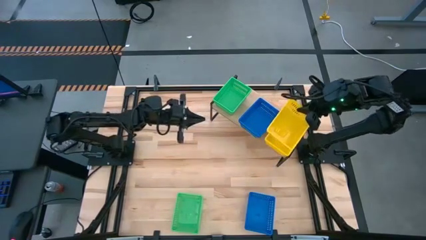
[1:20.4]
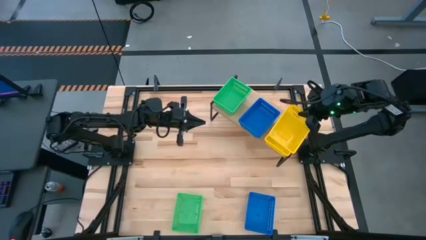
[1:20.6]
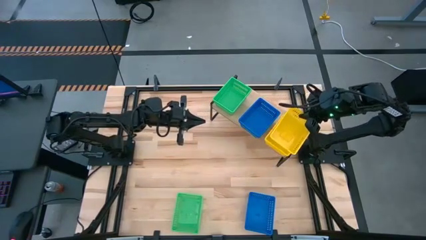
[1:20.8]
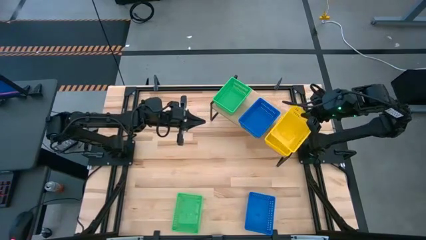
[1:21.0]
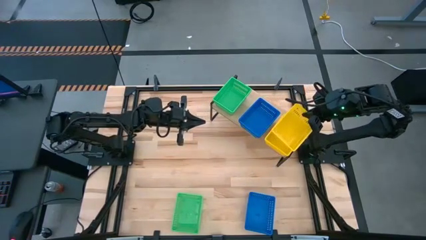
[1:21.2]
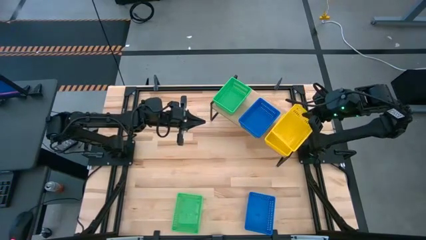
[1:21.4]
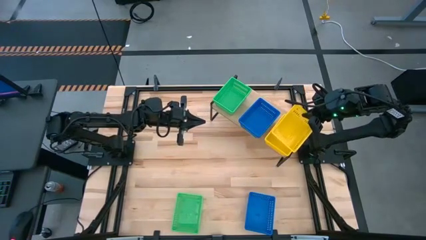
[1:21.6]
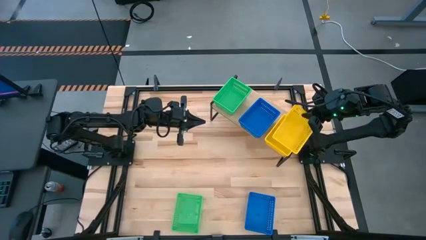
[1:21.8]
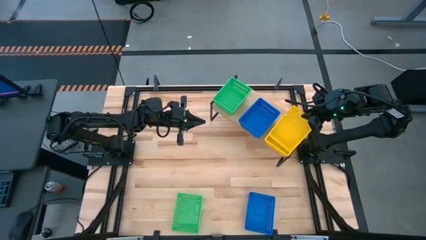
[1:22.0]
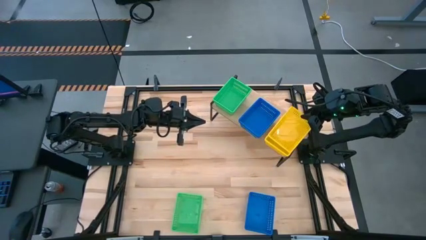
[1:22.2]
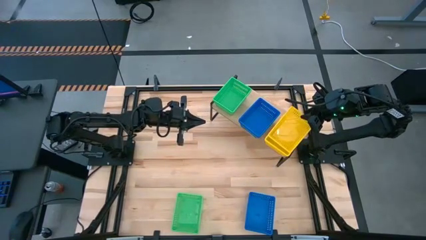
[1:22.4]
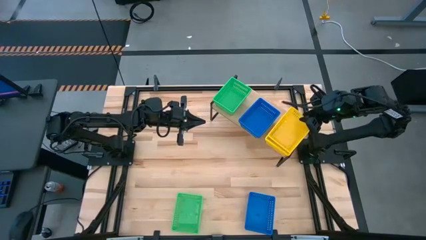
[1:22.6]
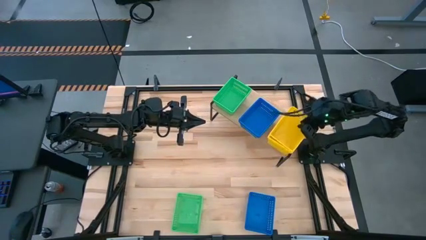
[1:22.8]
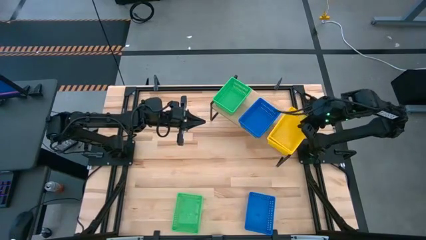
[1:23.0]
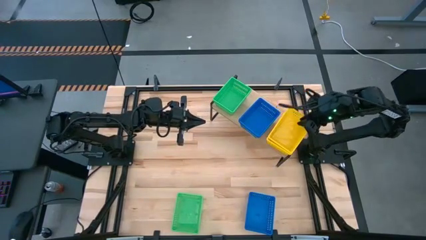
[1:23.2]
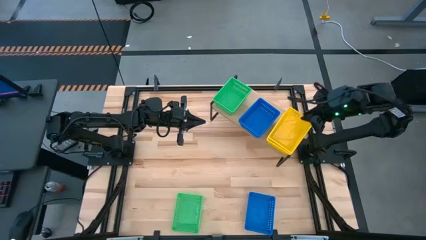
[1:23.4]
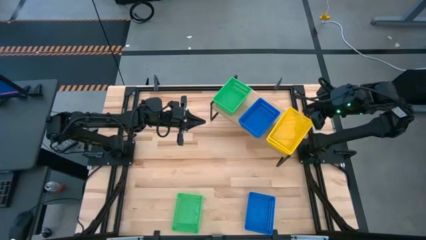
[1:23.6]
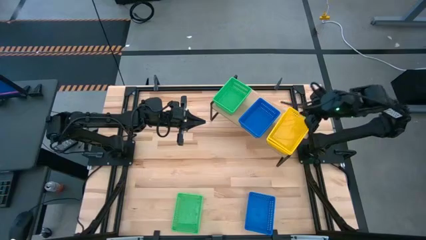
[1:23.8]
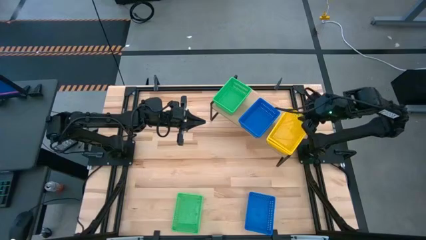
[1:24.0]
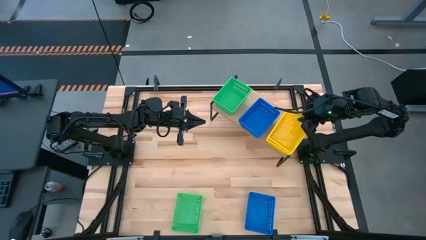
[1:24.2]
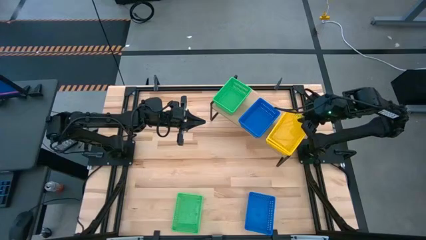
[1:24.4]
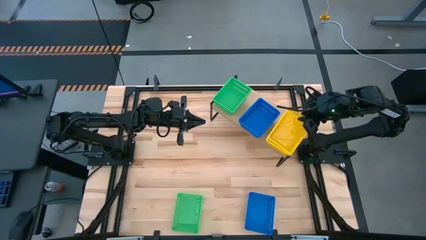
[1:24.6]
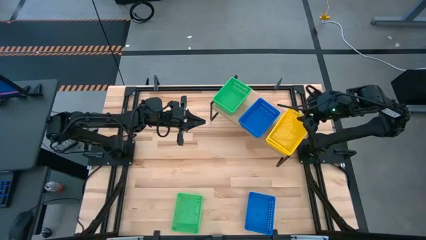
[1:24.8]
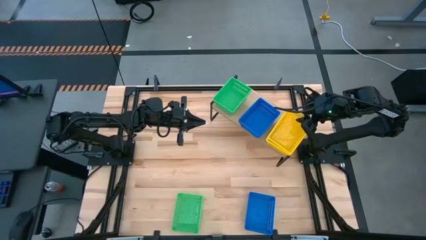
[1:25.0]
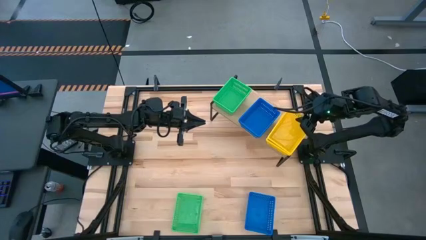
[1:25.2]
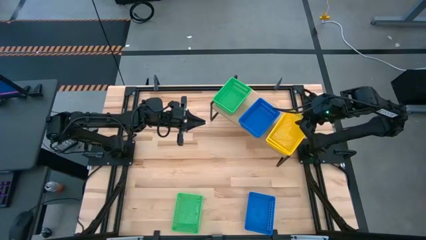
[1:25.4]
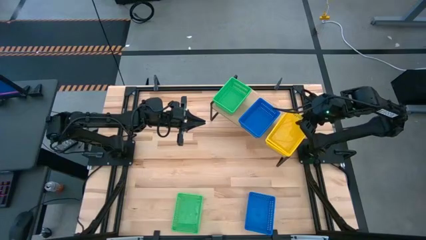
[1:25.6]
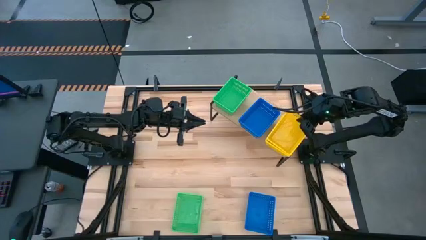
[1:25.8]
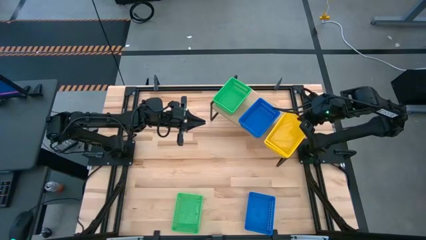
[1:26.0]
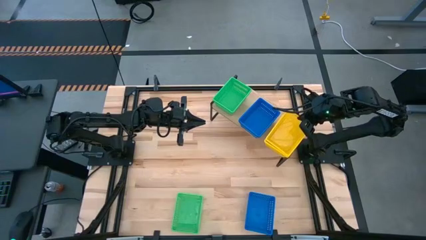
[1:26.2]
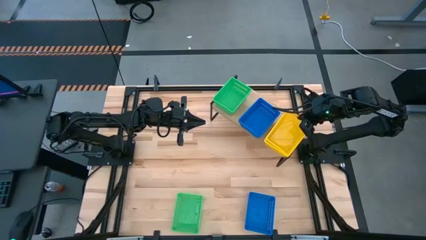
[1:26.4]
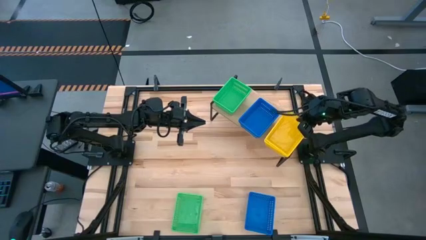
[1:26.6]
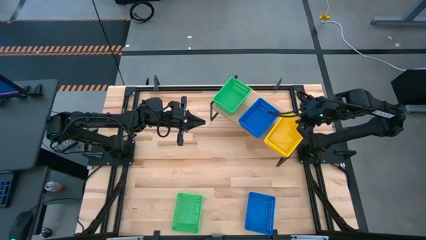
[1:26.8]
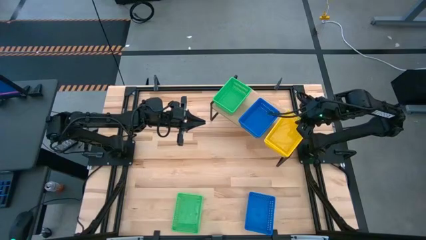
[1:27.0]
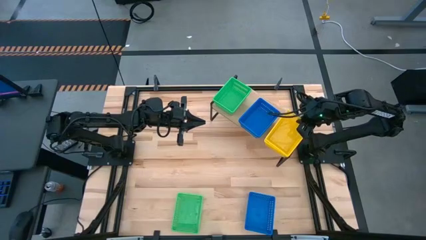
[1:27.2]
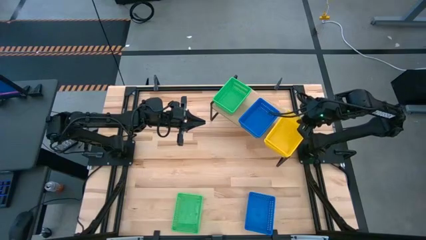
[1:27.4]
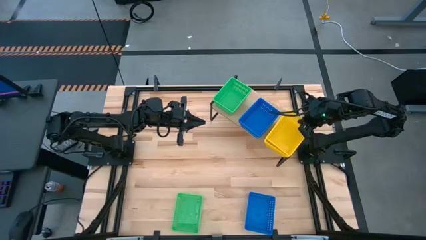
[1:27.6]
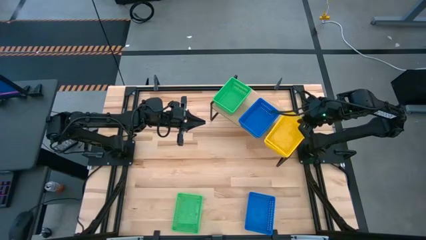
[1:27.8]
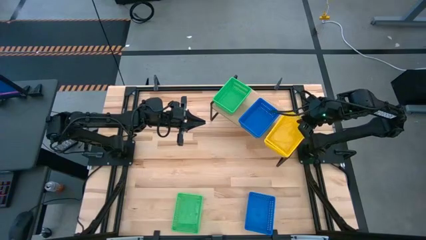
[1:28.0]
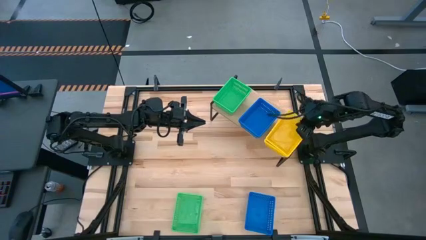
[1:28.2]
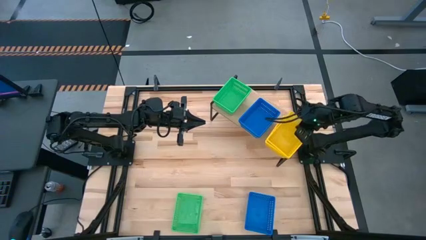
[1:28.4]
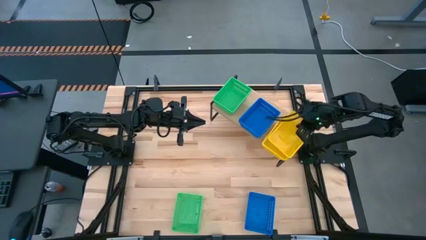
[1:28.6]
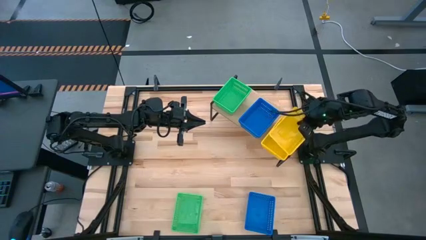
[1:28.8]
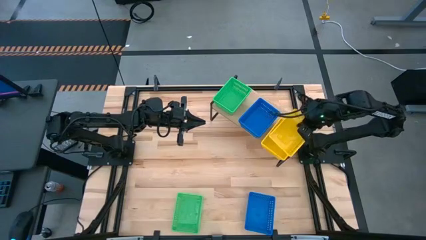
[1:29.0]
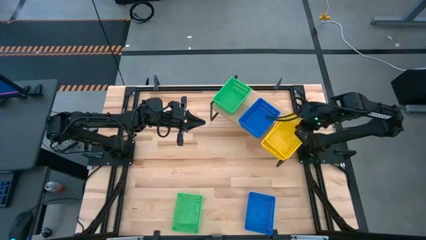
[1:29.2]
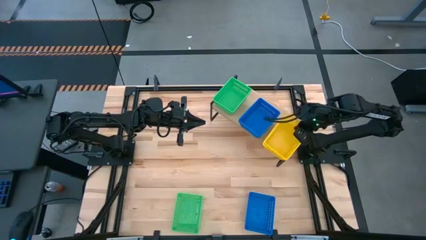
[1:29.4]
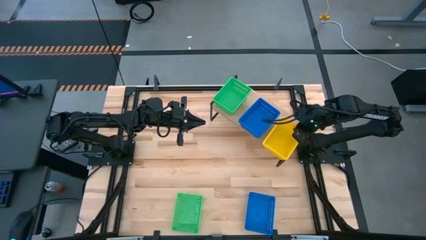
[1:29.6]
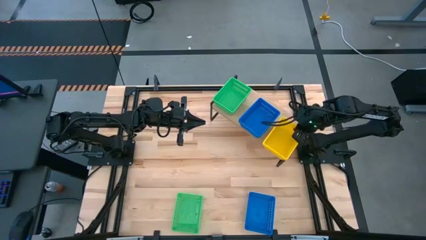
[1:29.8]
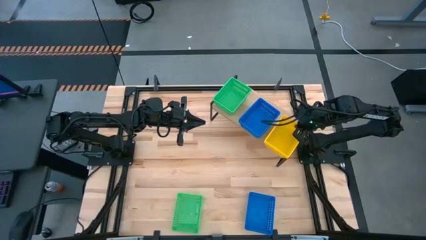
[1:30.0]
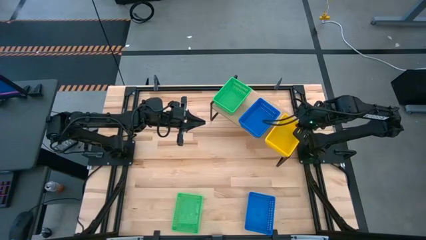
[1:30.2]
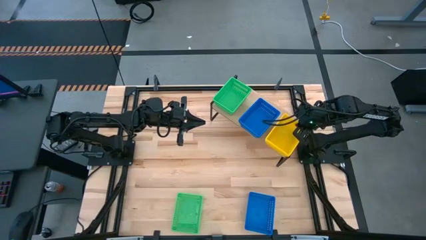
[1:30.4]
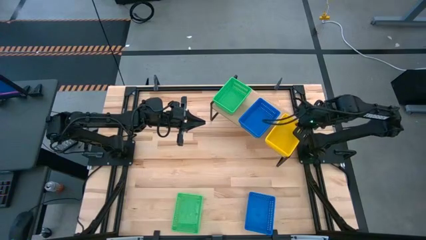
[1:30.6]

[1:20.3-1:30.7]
Task: Stack baskets on shelf by color
Stack the yellow bin on top of the yellow bins on the shelf

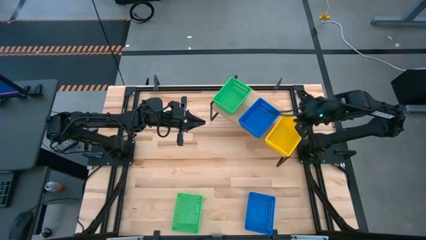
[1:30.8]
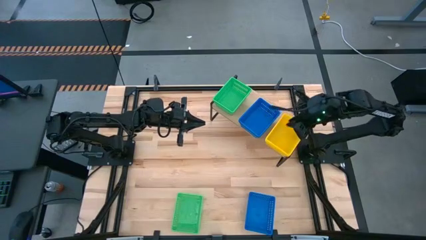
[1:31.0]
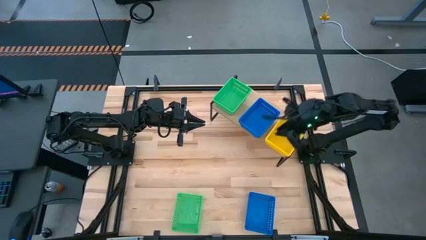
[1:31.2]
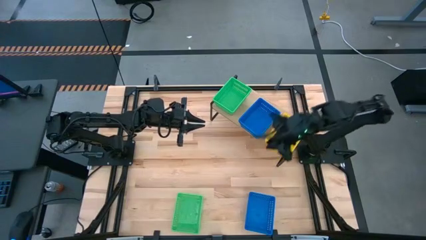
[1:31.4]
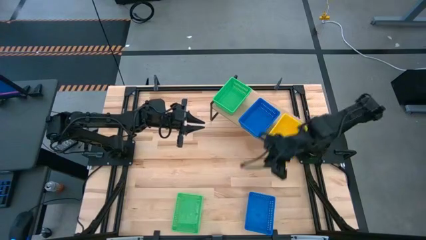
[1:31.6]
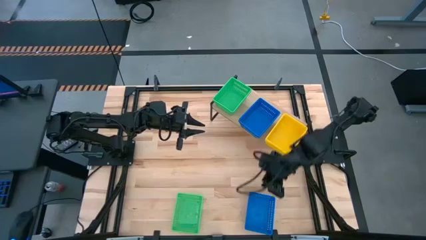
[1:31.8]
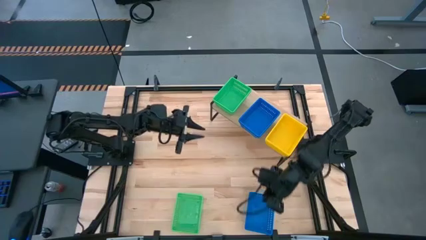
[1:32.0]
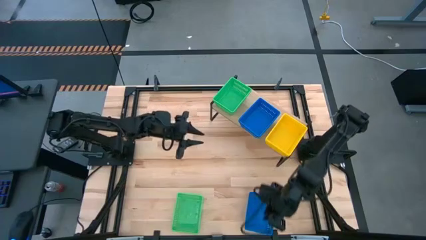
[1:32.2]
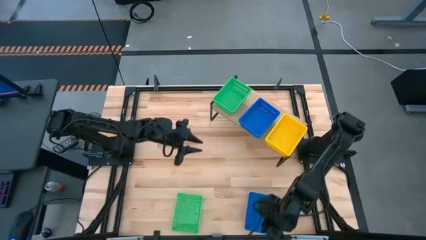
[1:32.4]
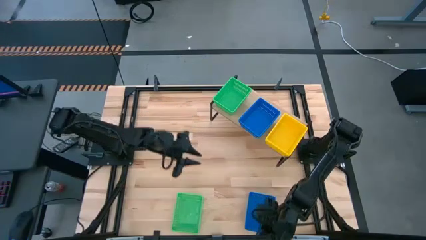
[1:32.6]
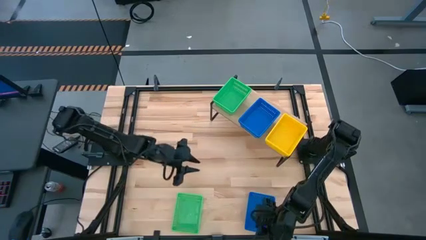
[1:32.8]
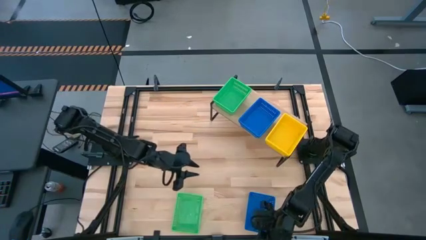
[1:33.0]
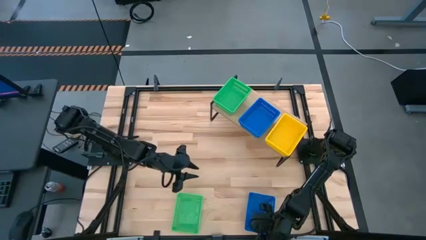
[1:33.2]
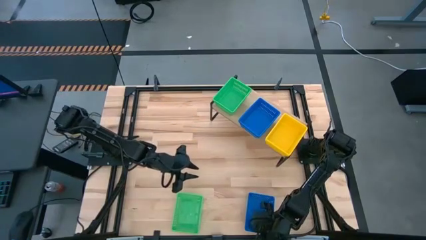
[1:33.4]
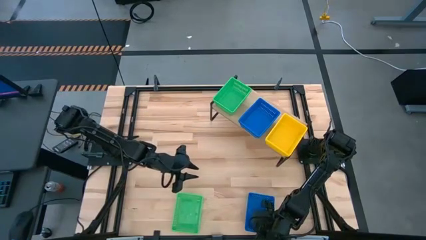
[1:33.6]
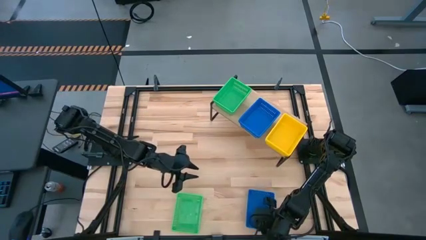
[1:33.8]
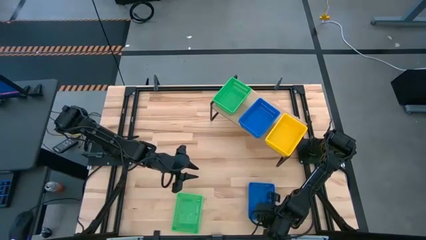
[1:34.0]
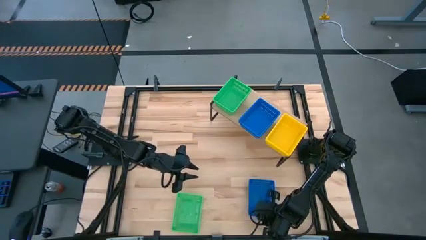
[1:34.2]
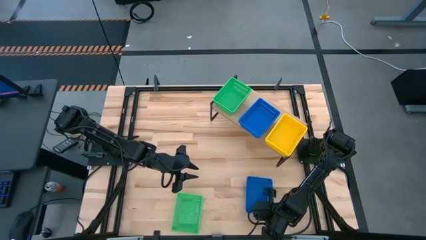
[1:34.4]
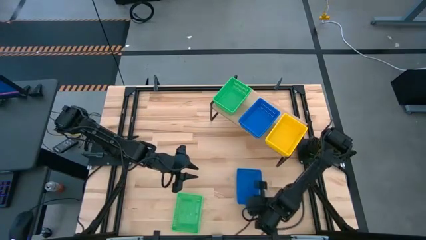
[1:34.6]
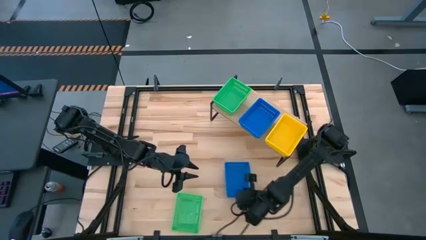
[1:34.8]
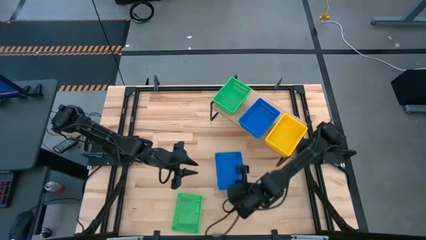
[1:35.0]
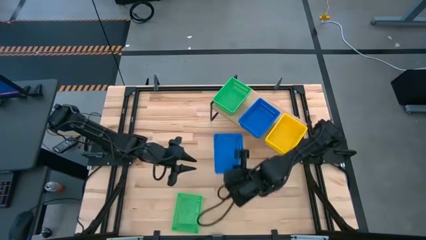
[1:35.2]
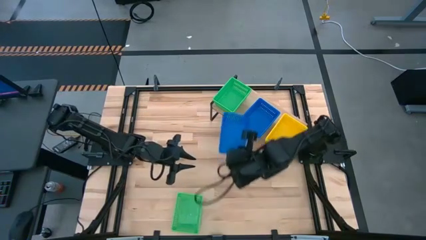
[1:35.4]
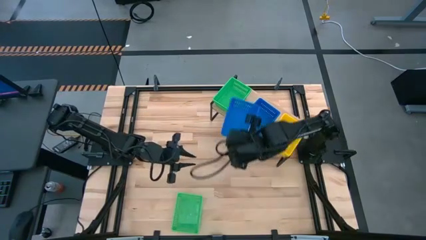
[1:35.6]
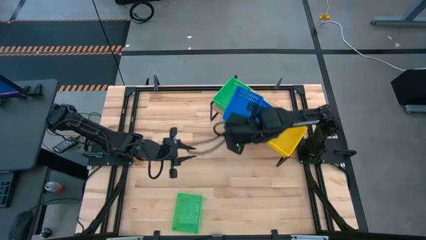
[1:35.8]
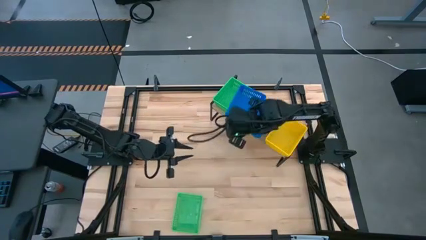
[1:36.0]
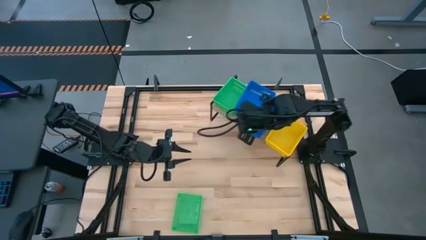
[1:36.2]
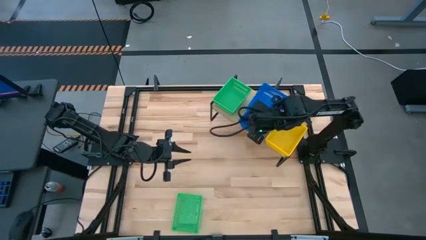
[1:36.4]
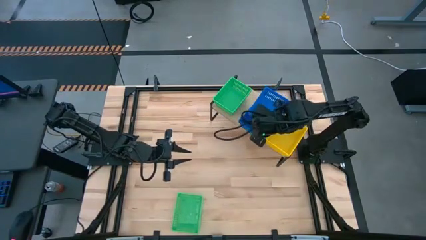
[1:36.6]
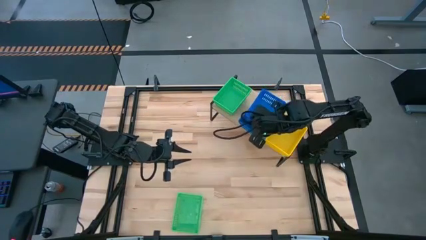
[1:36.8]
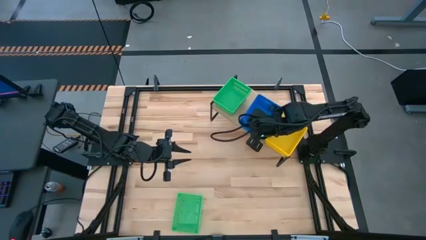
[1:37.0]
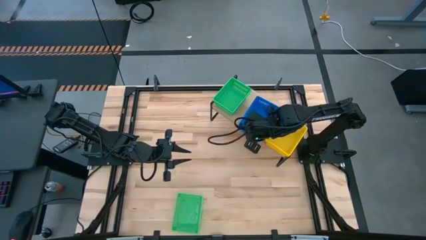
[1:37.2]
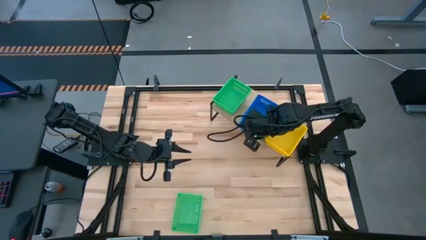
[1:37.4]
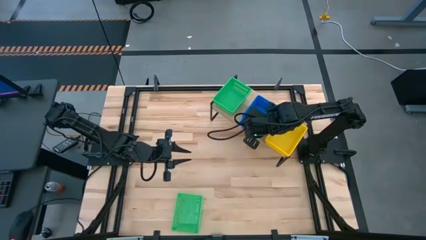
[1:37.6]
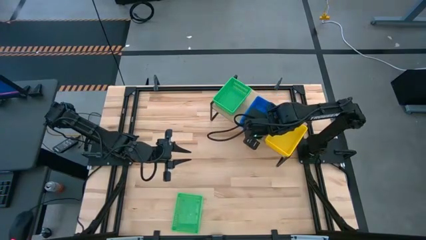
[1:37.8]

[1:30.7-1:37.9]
Stack the blue bin on top of the blue bins on the shelf
